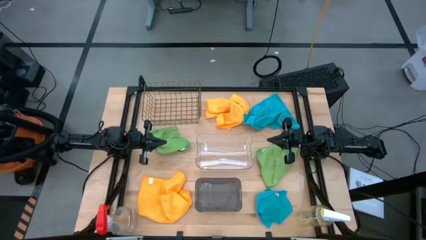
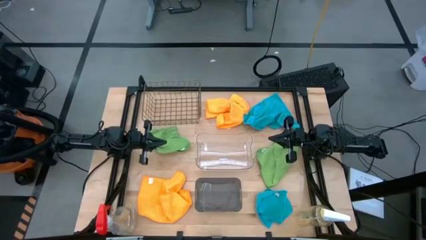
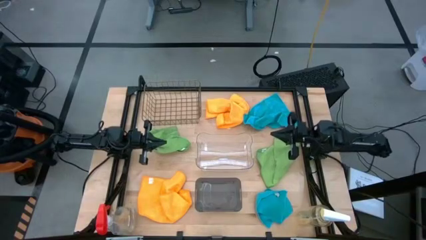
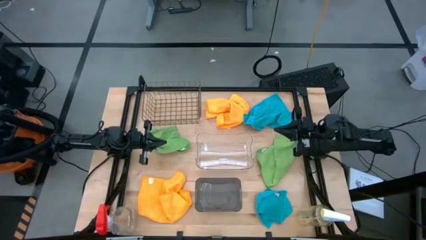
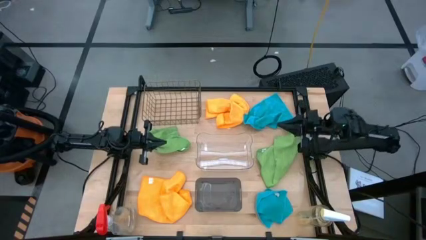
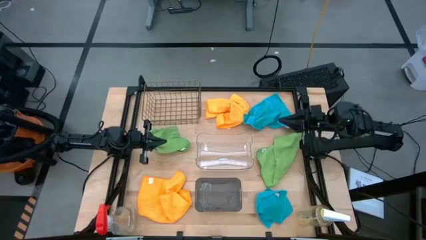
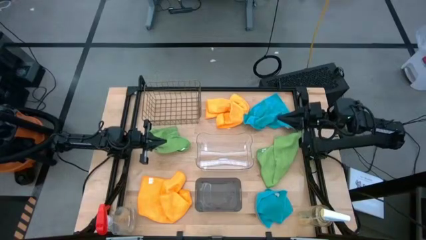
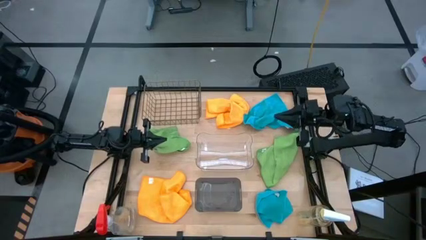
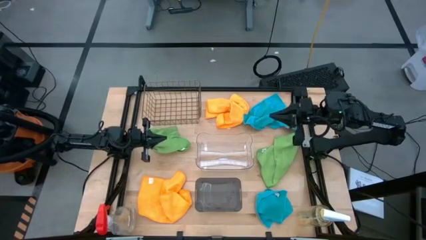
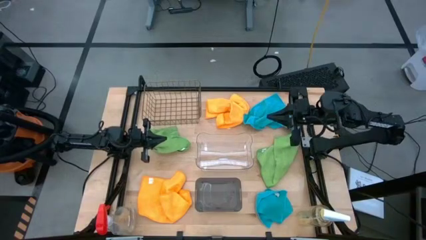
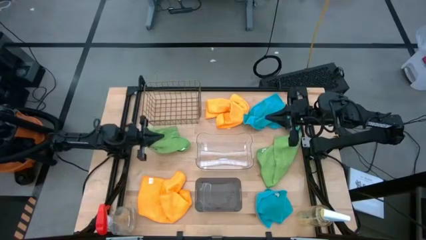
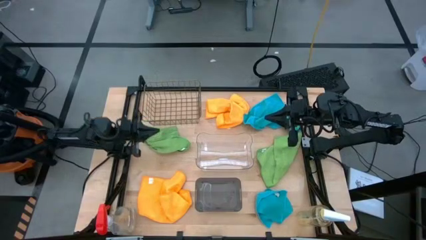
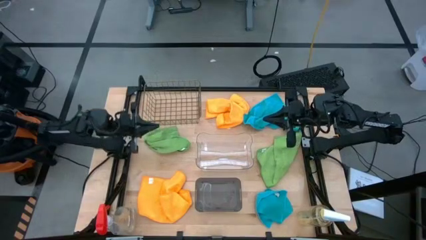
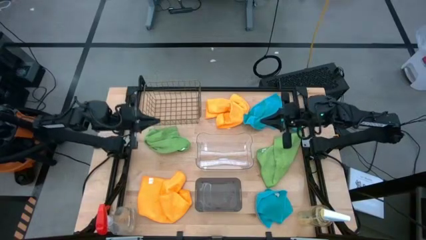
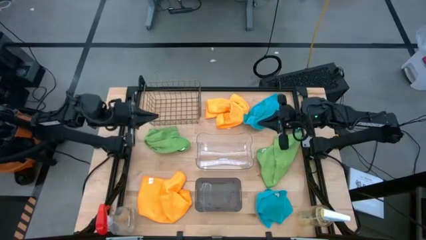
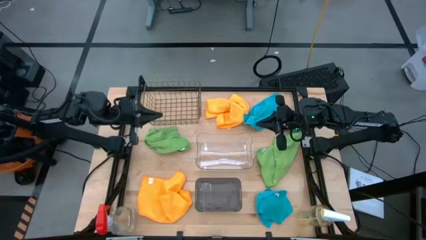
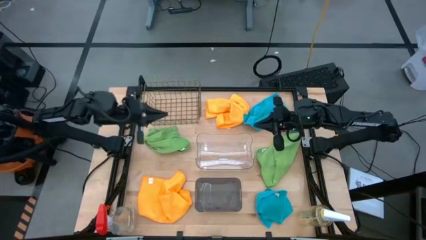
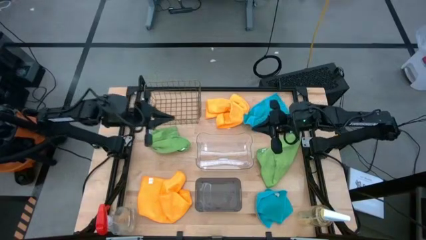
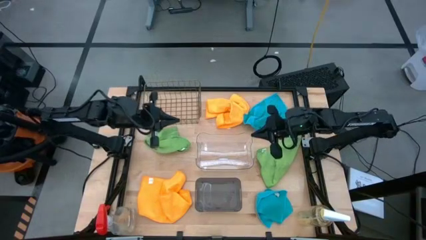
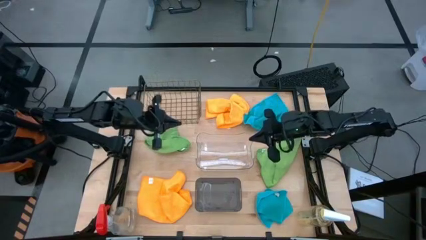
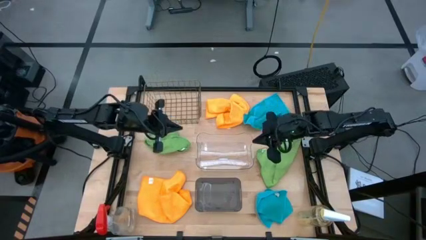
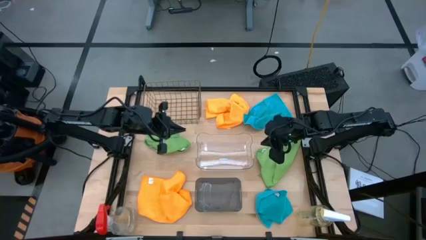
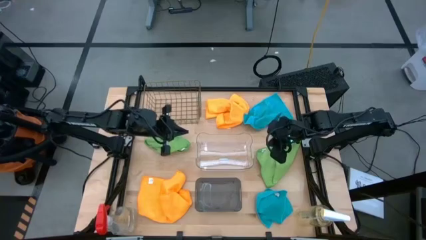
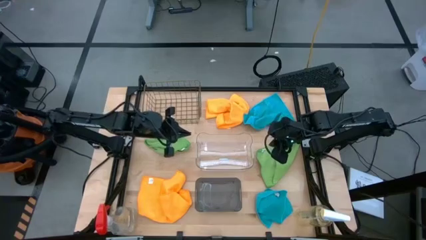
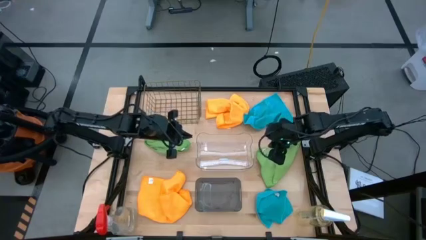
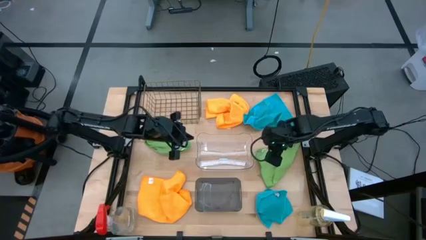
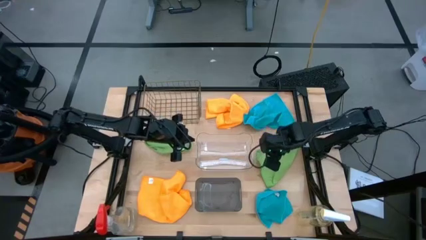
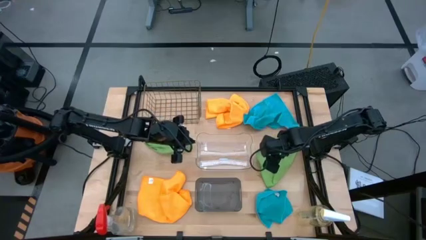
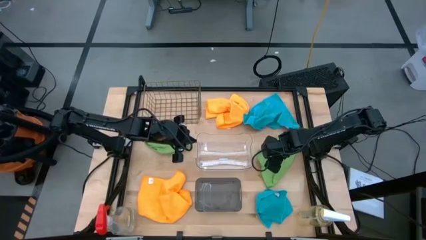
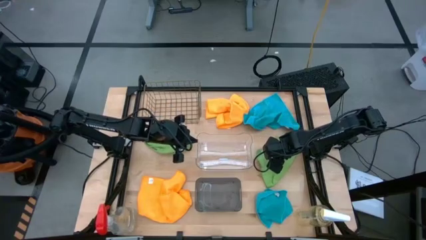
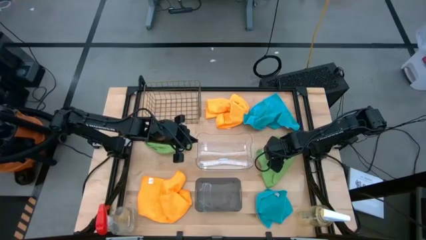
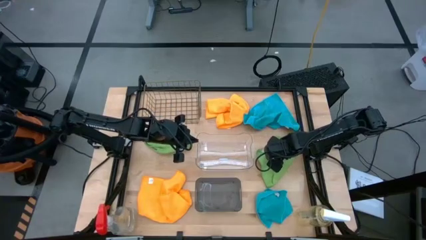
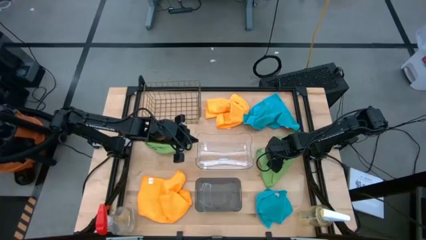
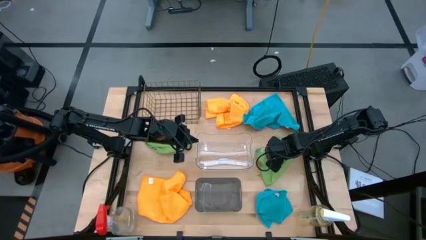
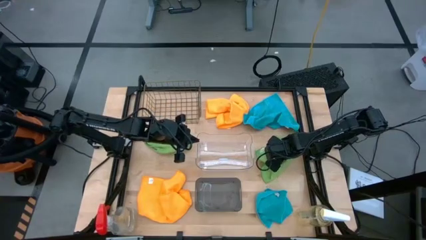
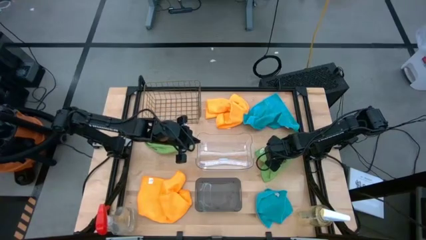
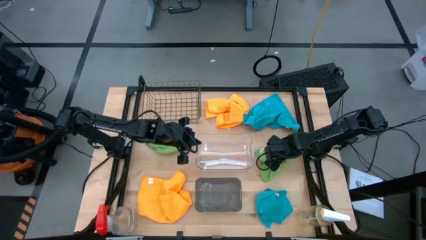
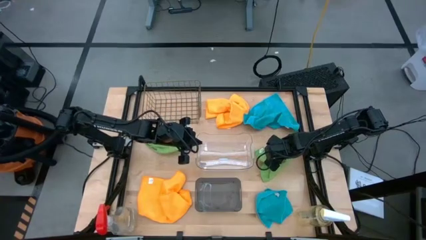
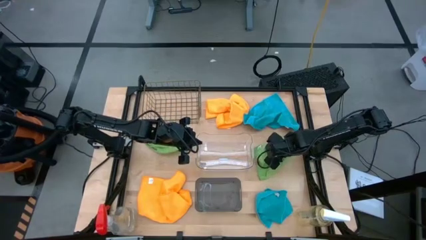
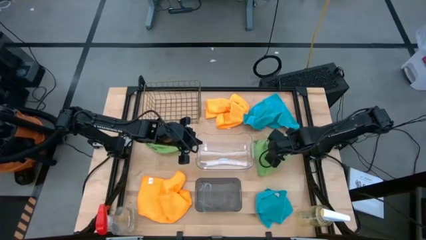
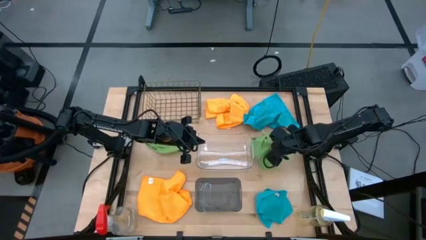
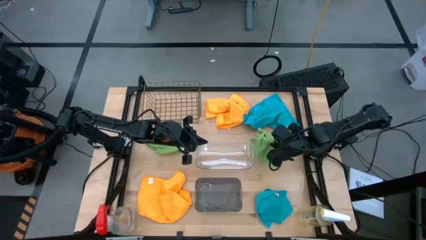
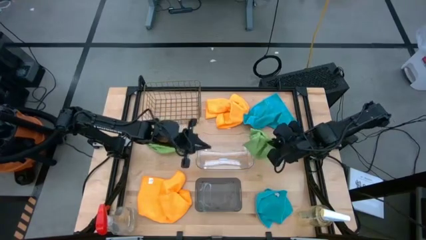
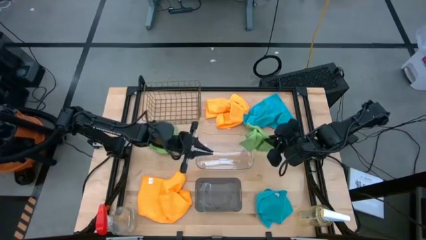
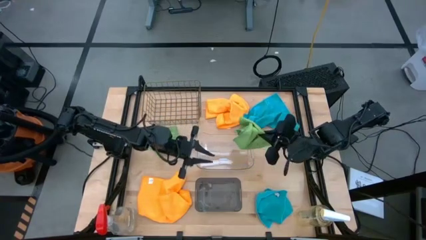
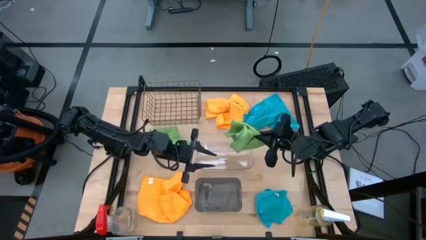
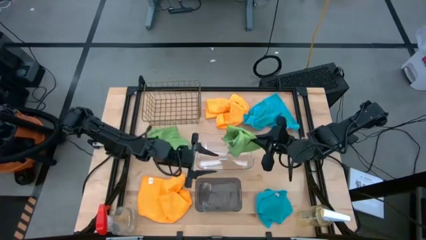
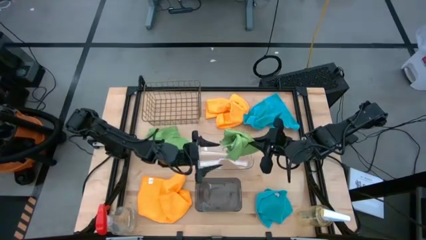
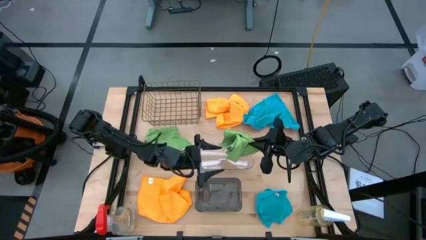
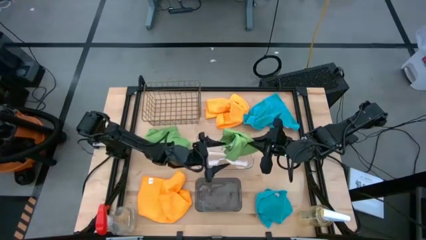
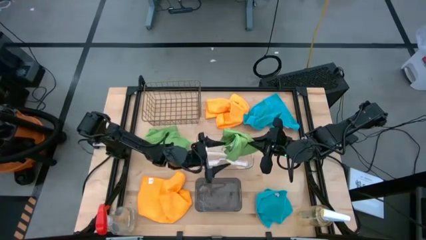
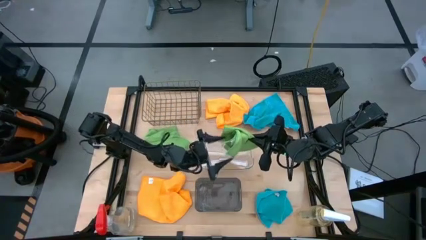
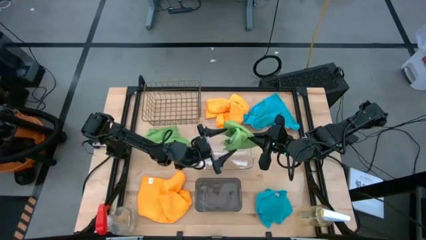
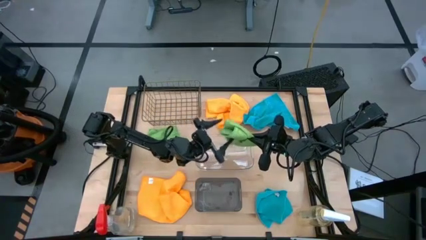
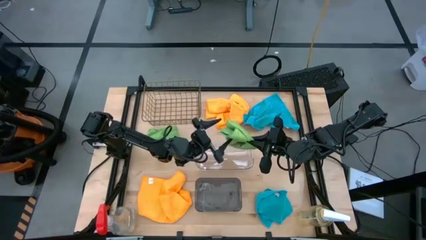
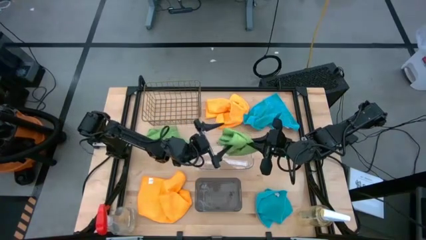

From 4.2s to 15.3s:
Task: Sort microfiber towel by color & place in baskets
Put the right green towel into the black transparent bin

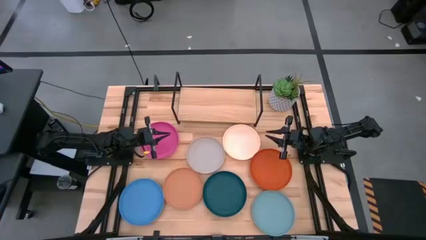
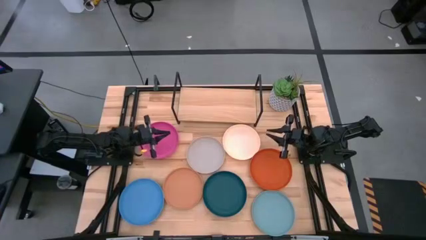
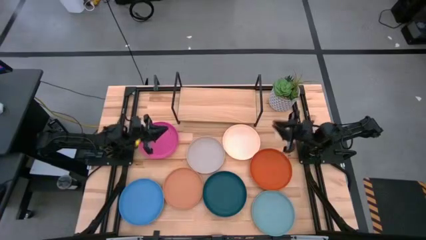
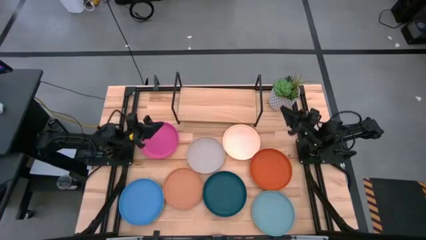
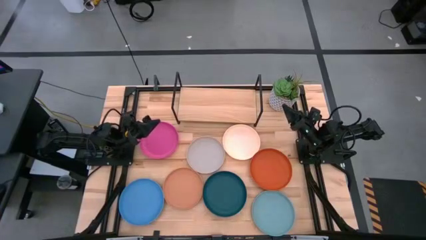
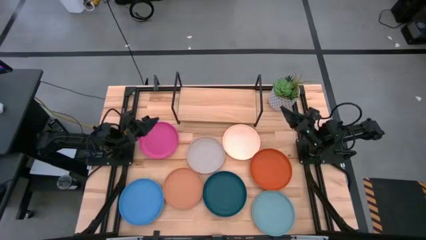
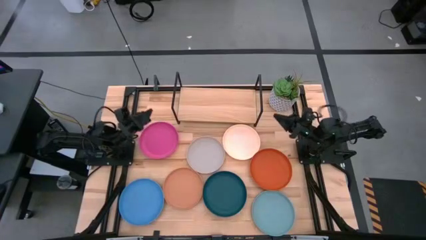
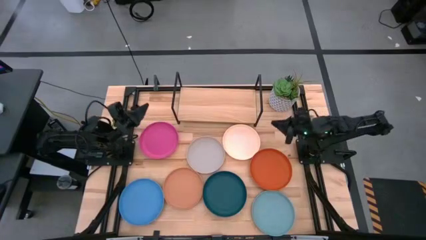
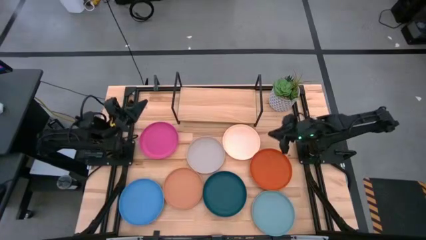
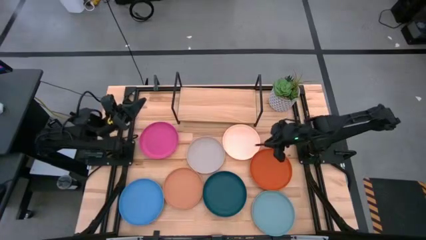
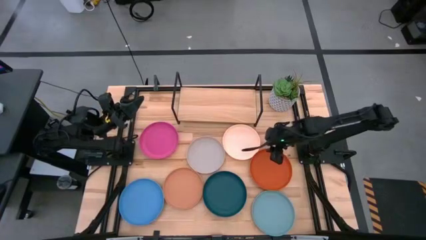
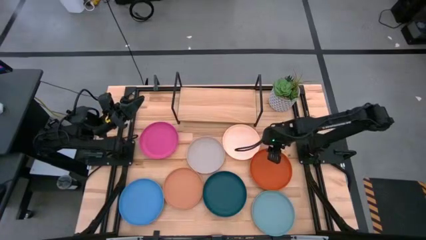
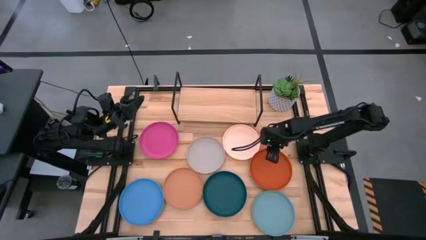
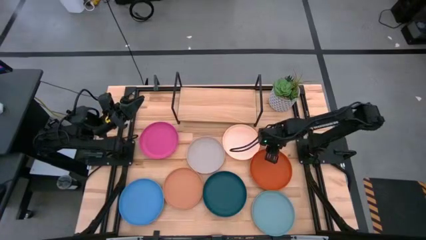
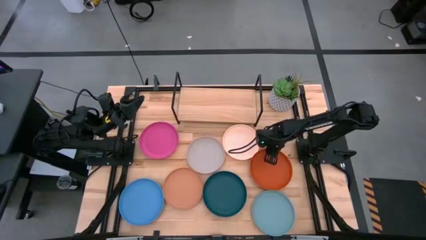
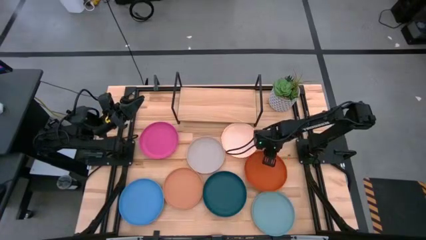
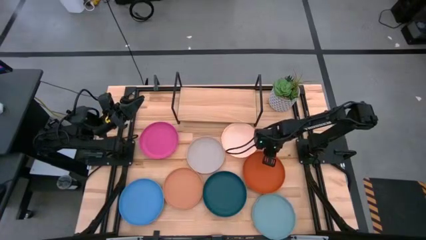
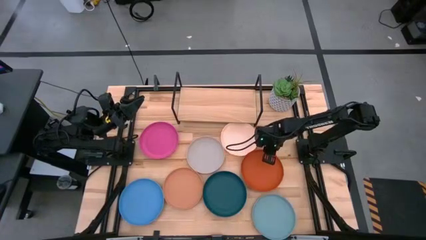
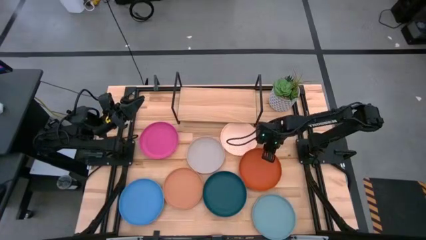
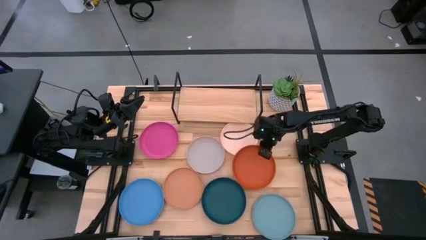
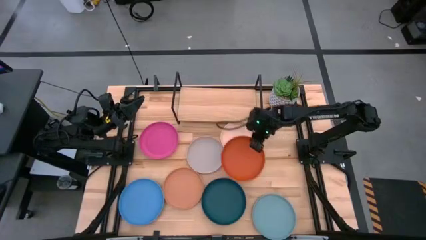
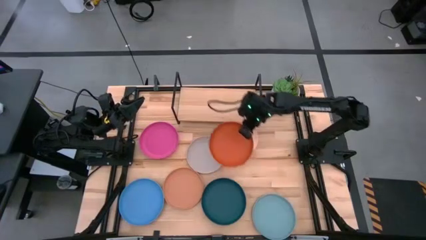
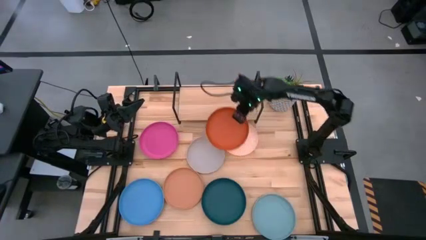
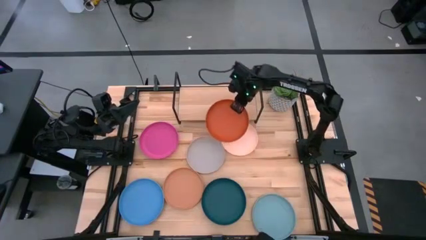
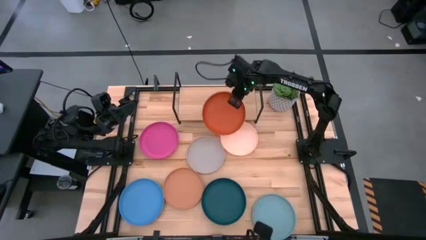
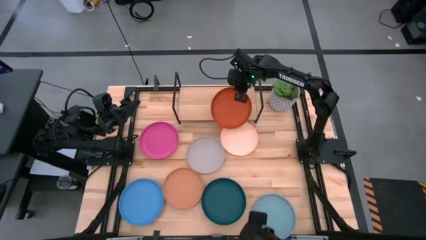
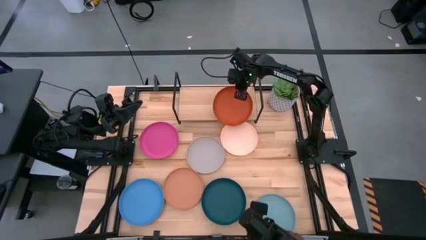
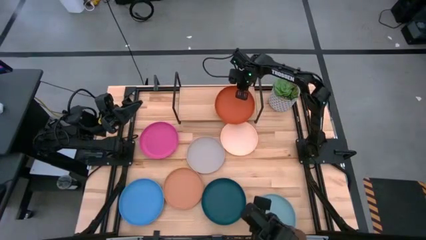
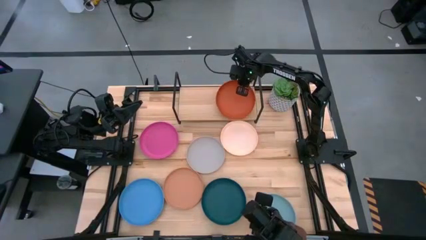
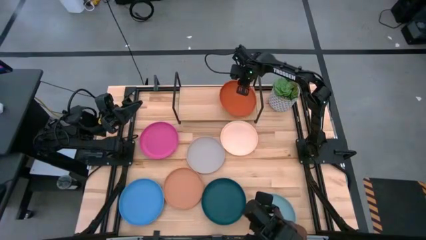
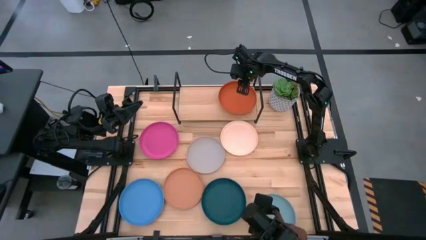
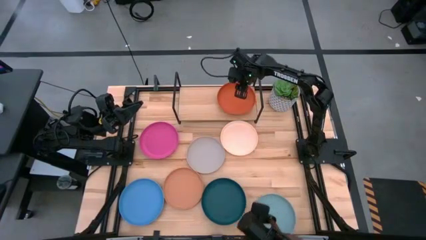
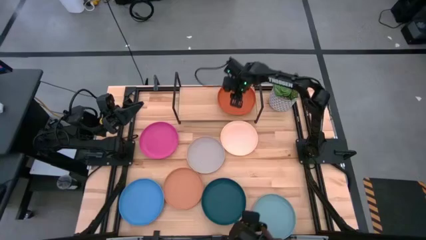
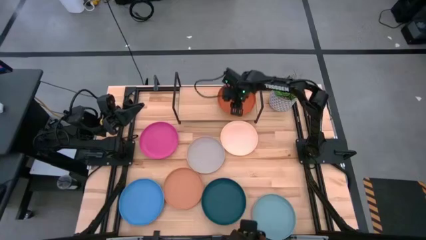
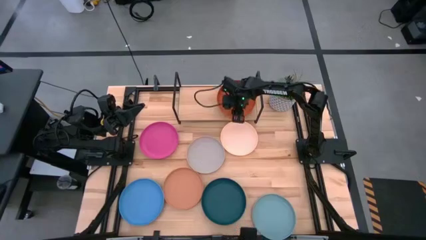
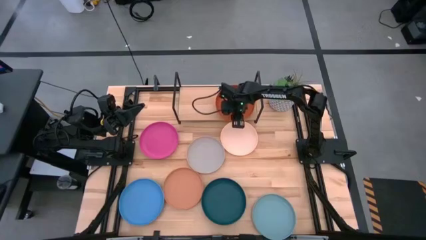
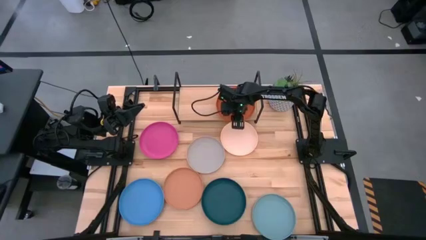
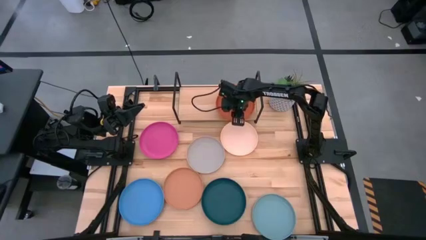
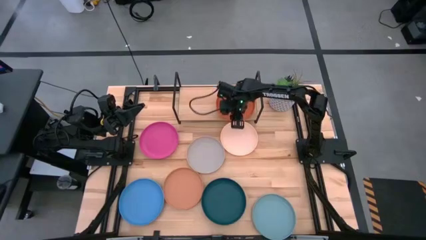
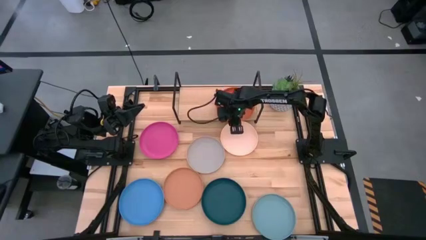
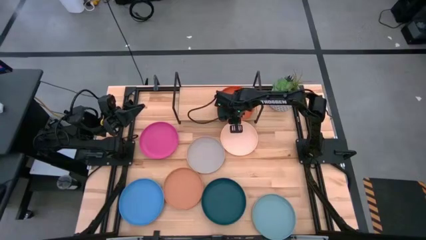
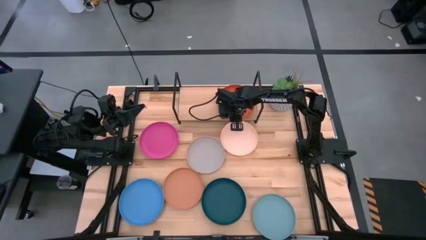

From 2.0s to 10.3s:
Task: Place and stack plates onto a shelf
Put the orange plate on the shelf
